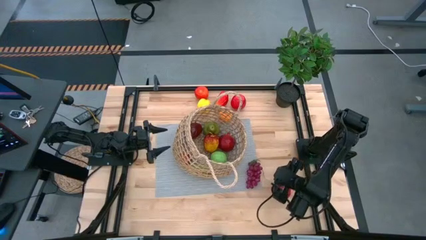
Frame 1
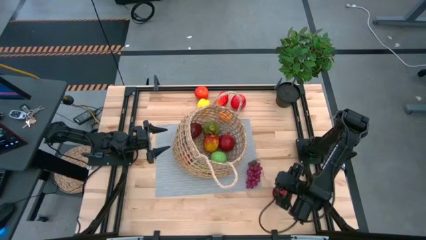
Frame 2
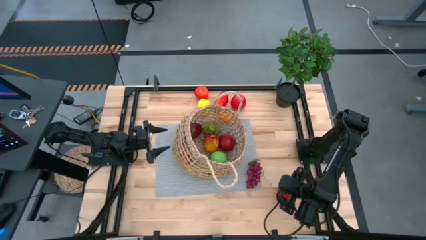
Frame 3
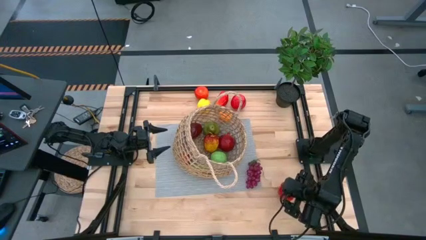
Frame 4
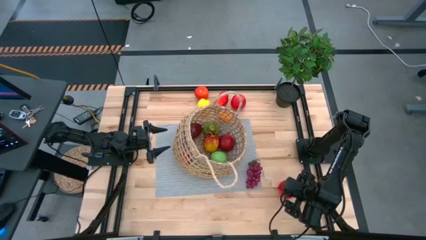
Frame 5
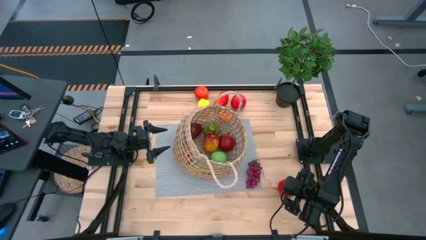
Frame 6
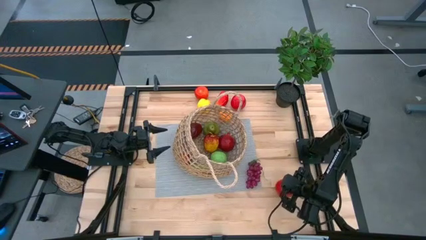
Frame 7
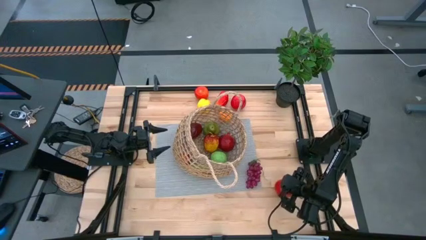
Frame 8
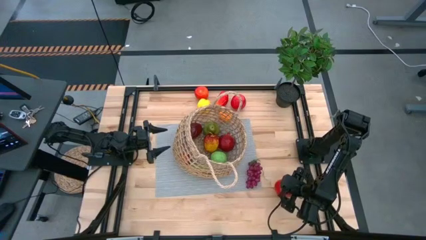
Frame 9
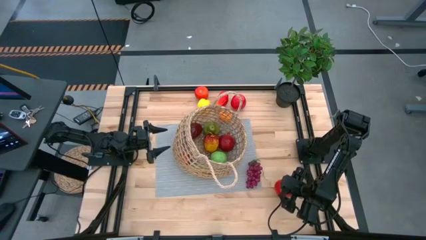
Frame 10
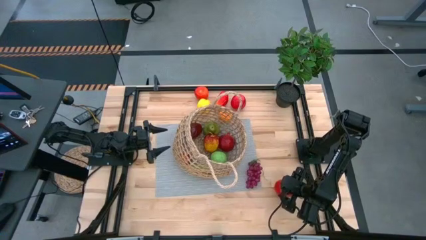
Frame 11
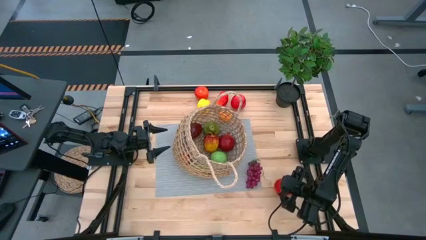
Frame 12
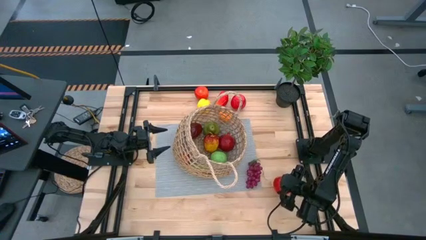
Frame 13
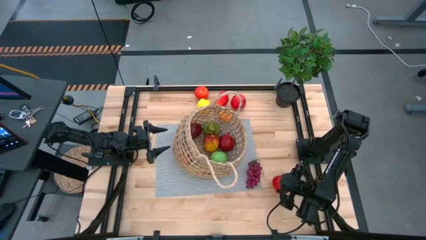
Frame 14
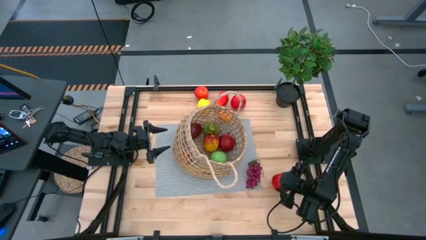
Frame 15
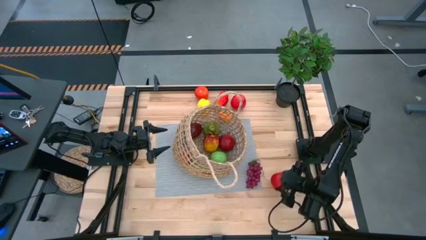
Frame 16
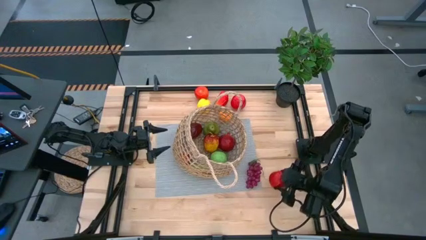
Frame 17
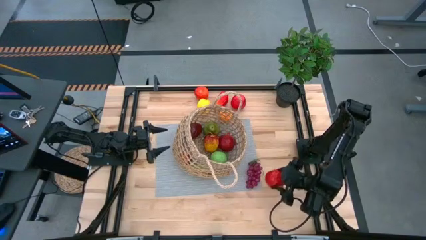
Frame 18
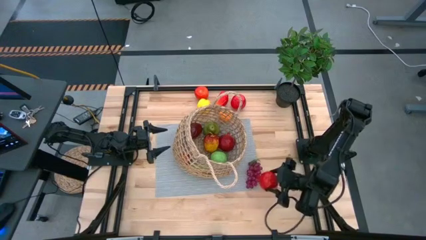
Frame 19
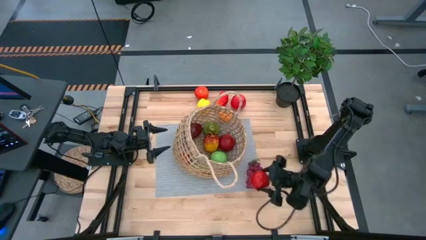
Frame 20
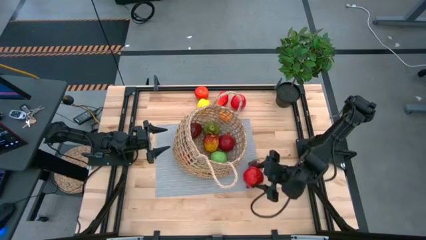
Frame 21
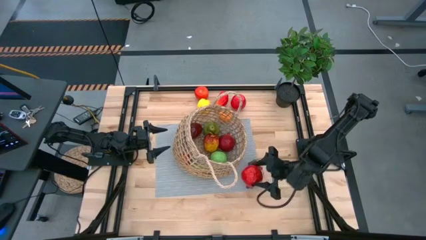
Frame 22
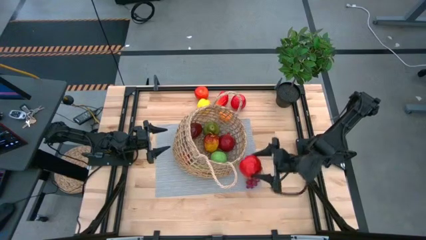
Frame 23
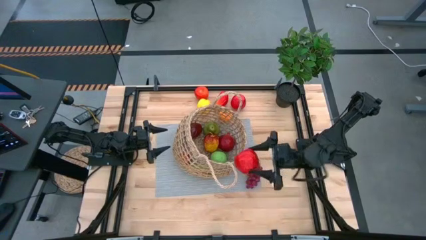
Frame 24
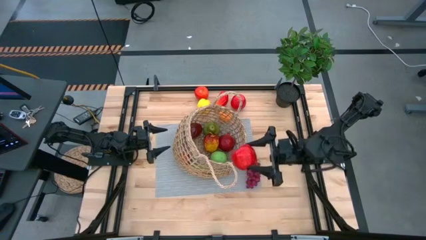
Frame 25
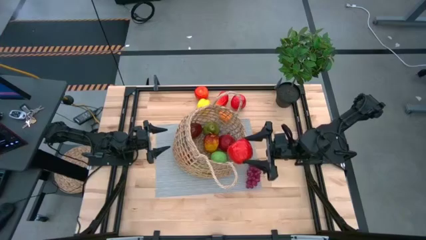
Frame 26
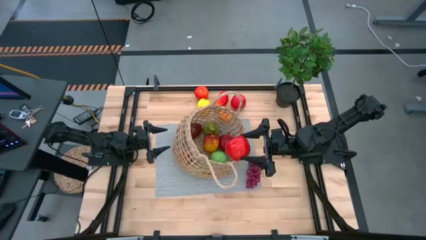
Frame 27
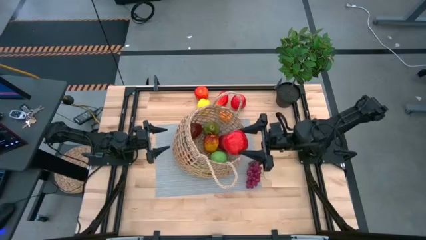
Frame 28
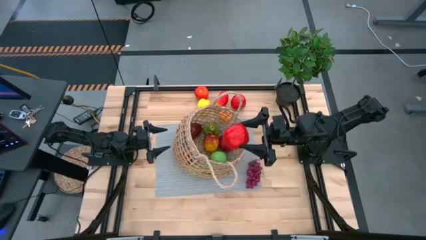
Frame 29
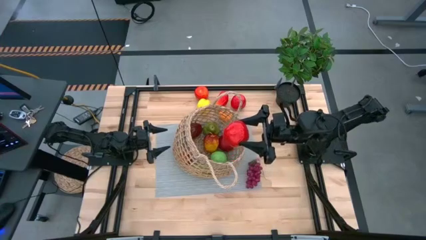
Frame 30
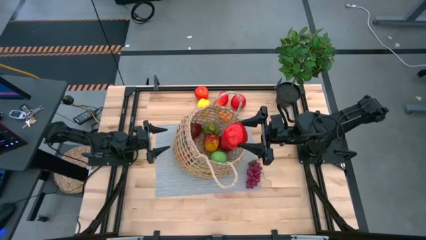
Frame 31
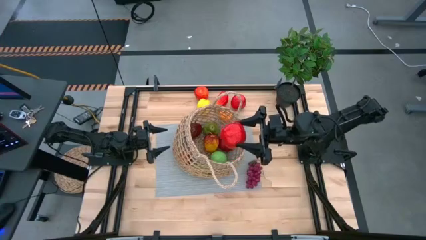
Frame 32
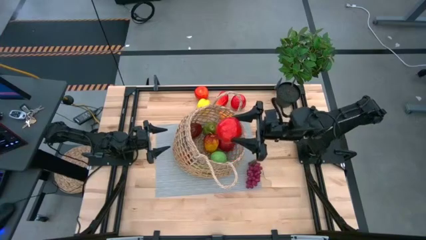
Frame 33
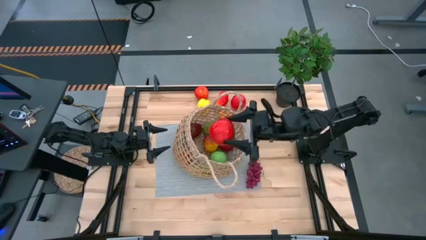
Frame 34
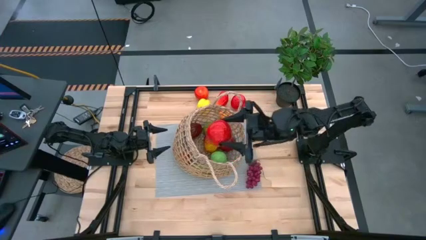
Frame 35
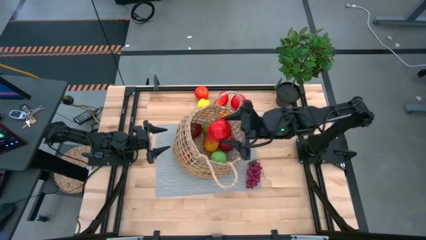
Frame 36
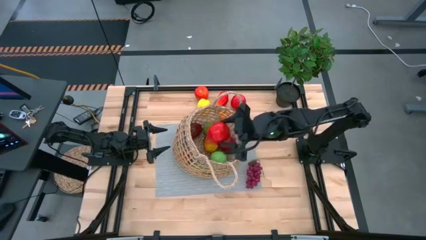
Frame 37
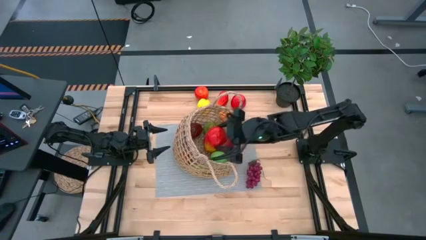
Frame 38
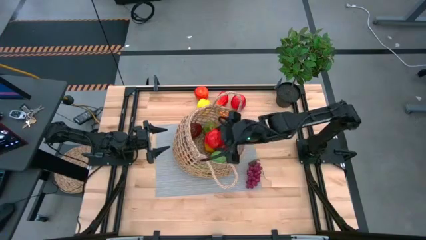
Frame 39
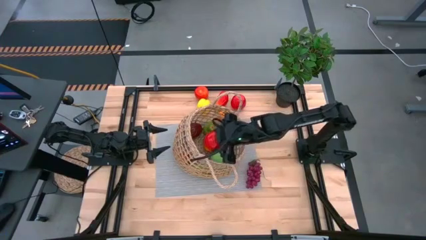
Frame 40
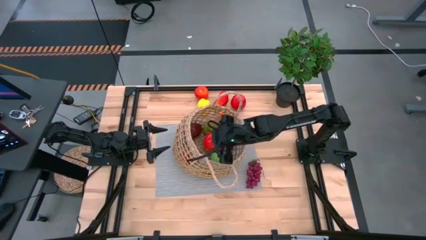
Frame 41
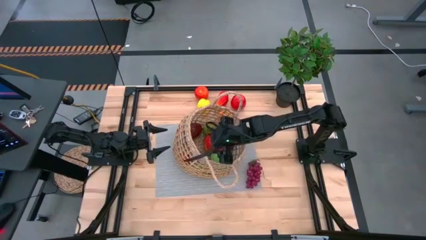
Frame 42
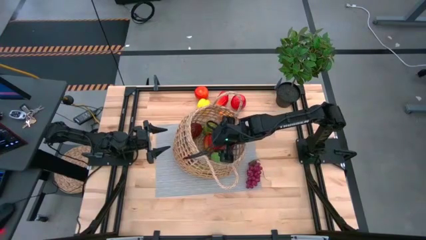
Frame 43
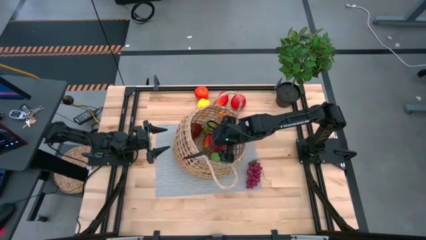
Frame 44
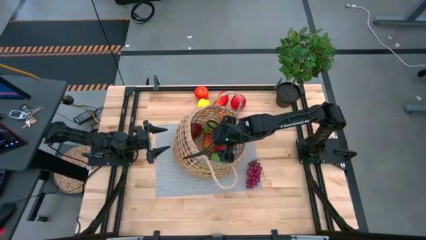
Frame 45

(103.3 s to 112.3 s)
Task: Build produce basket
Put the bottom red apple into the mesh basket

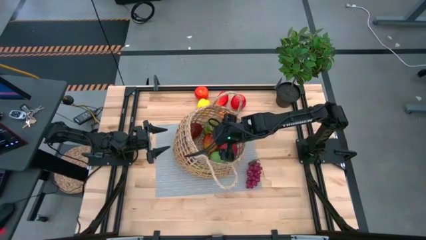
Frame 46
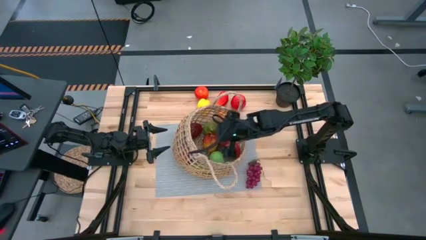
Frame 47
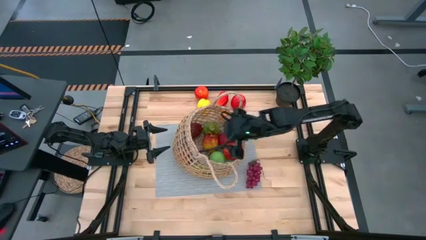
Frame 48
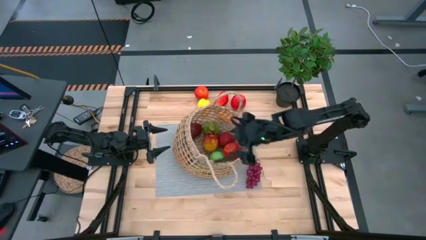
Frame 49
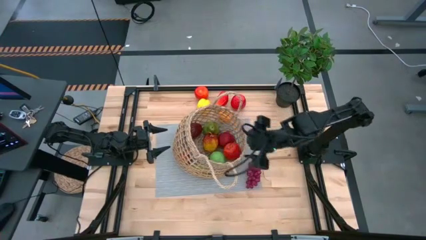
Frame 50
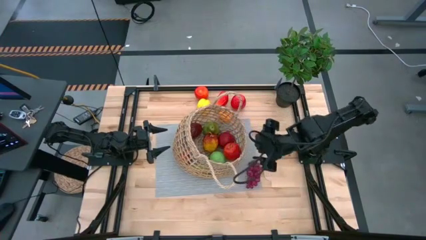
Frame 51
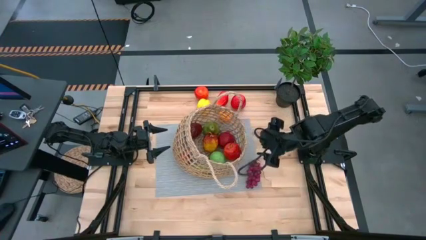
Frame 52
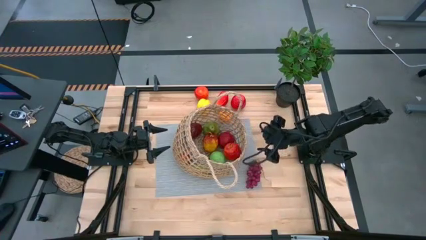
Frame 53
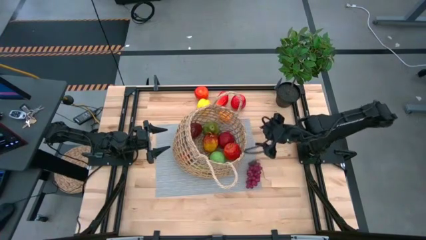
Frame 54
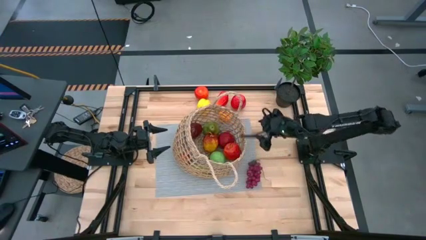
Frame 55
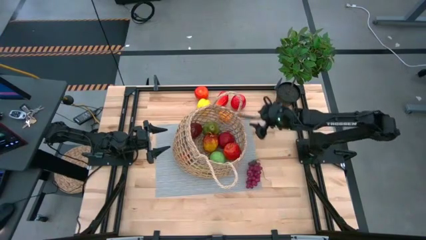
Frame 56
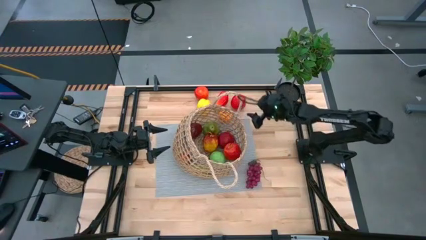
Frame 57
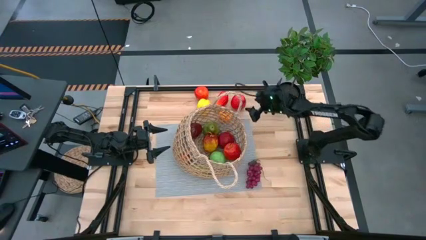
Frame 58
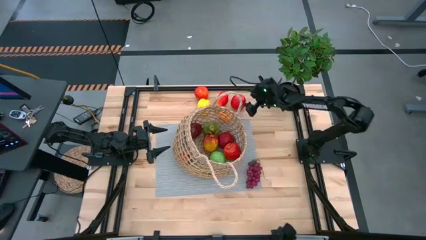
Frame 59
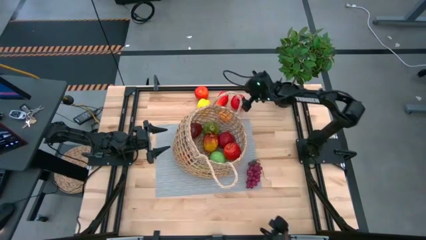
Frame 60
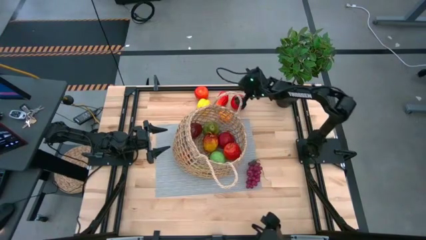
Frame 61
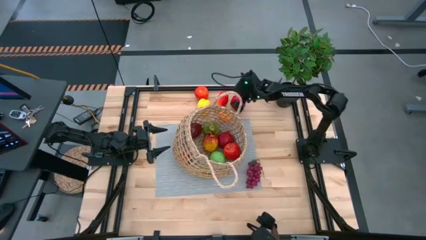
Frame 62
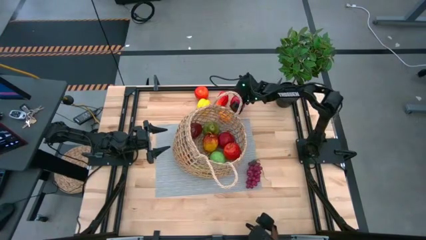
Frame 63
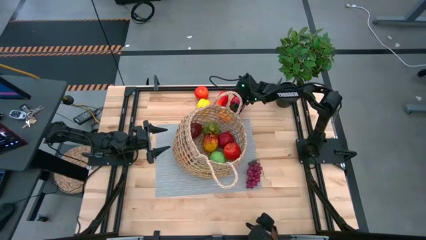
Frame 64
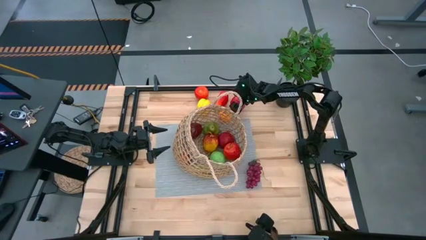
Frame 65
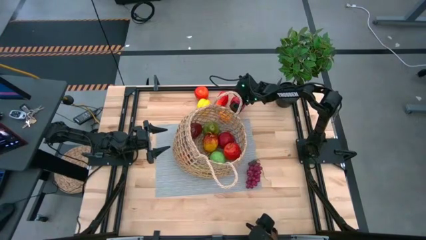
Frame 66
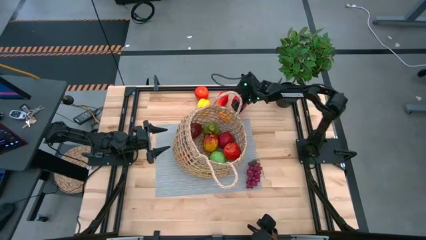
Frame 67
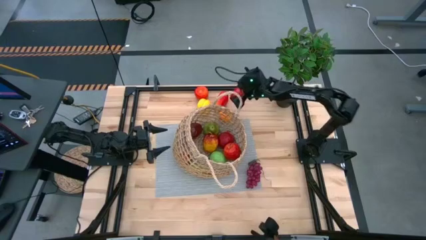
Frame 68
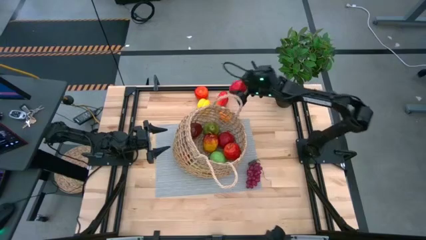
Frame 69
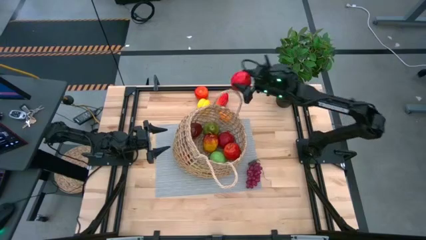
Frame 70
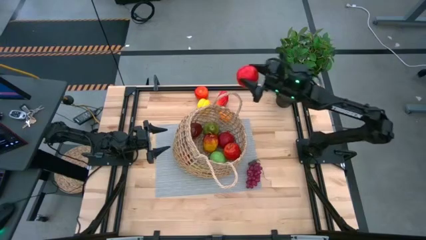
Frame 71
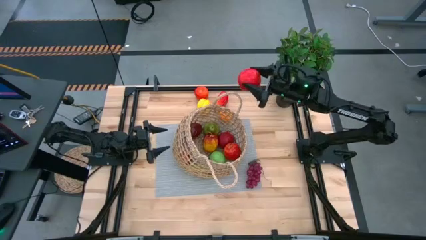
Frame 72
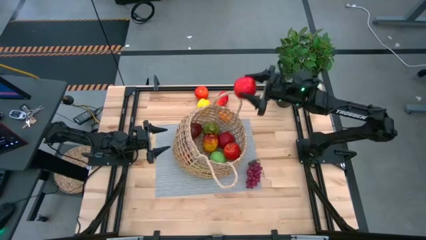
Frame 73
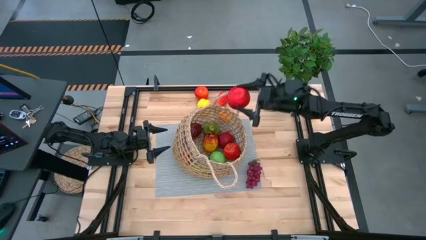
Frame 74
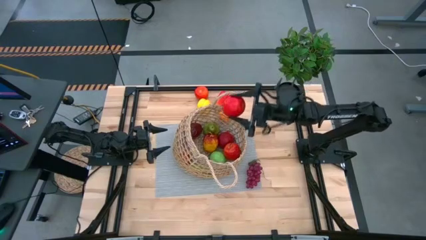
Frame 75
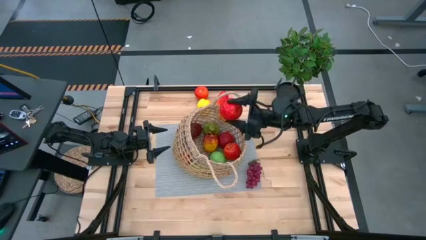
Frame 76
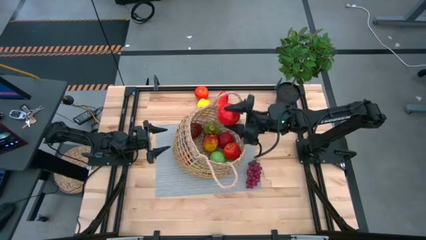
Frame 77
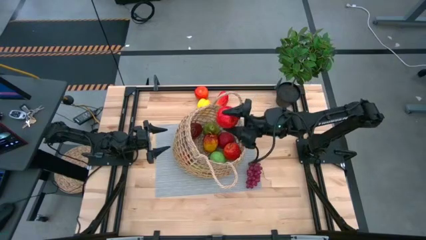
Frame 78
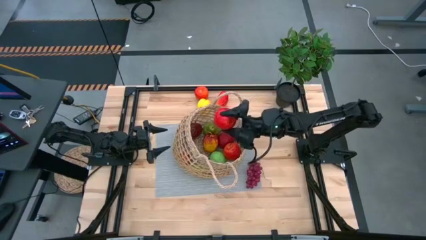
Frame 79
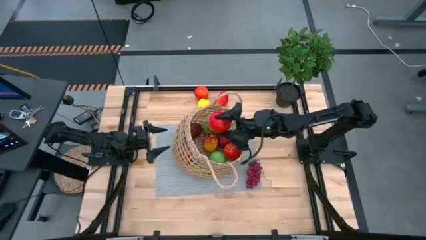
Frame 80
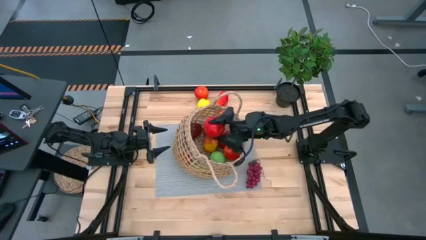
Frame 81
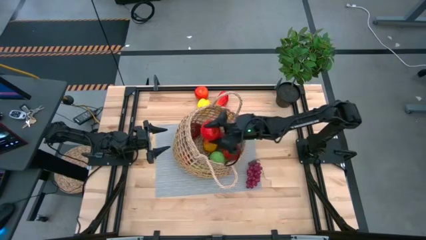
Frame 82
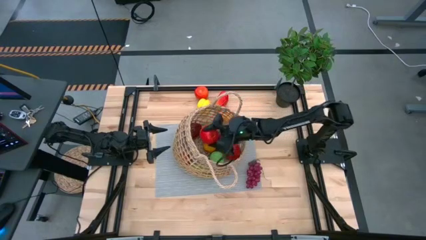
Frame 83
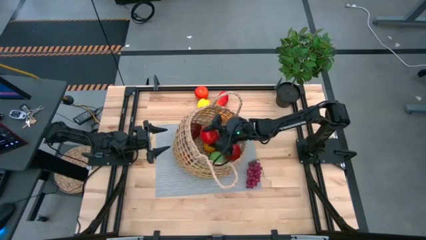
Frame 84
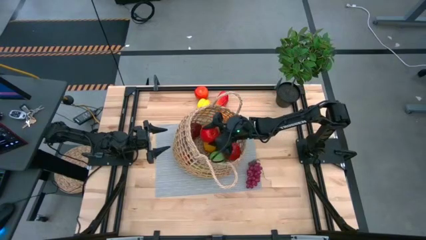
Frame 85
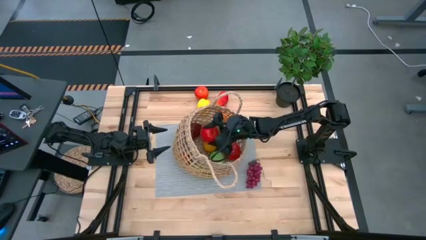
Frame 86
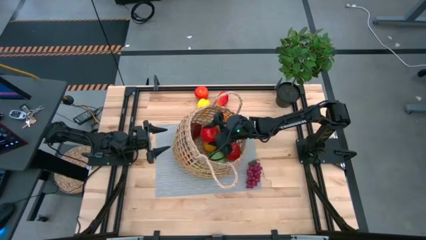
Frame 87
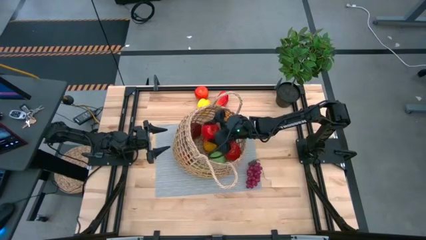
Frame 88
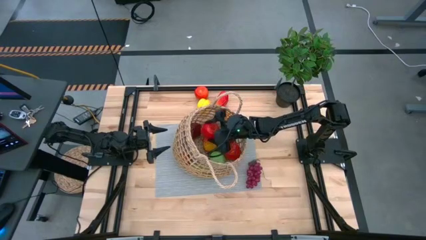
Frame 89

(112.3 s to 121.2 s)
Put the red apple into the mesh basket
